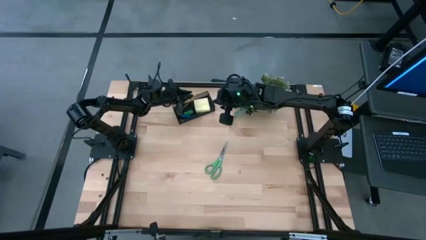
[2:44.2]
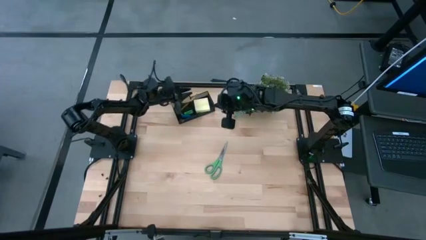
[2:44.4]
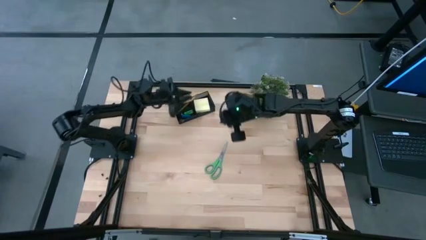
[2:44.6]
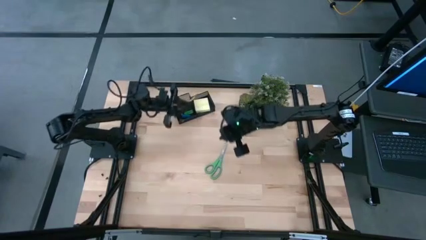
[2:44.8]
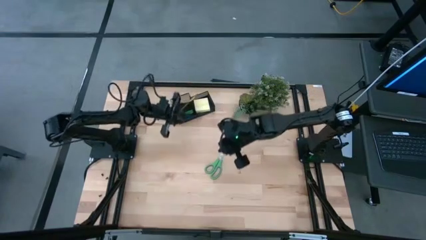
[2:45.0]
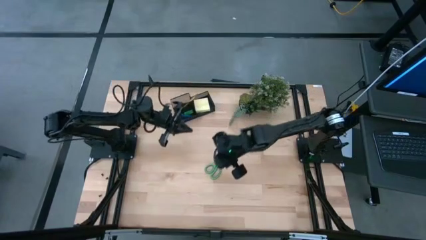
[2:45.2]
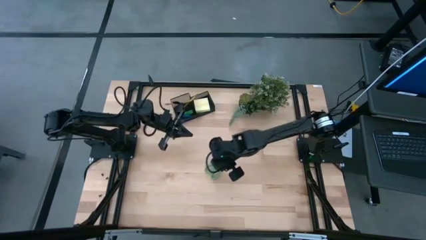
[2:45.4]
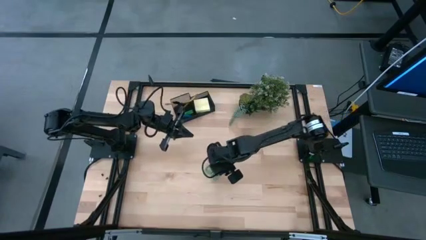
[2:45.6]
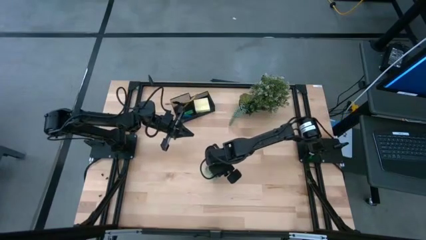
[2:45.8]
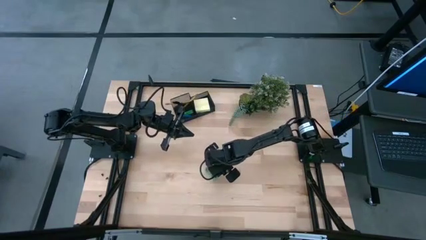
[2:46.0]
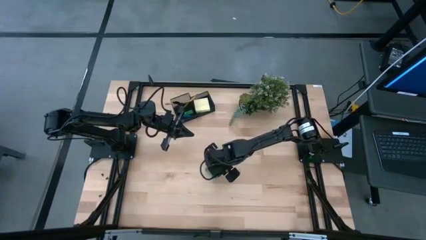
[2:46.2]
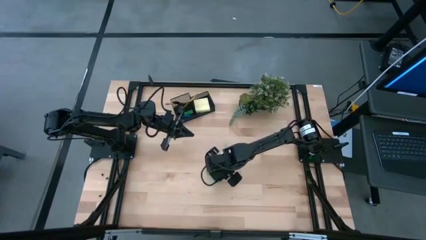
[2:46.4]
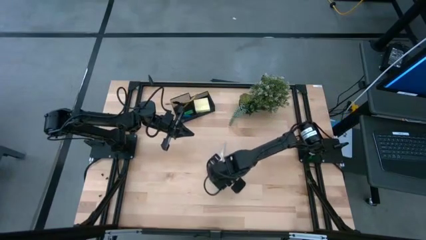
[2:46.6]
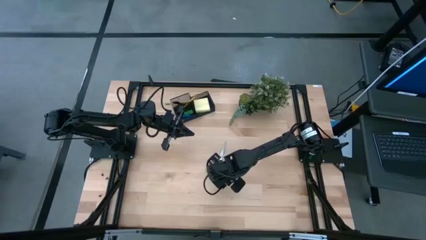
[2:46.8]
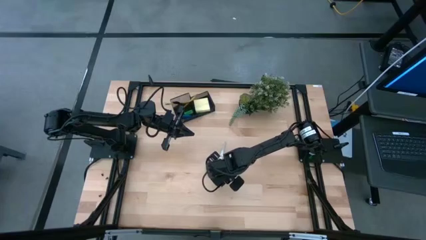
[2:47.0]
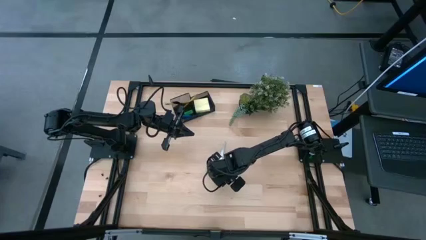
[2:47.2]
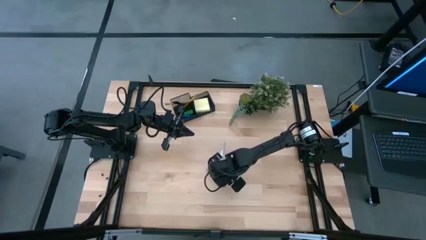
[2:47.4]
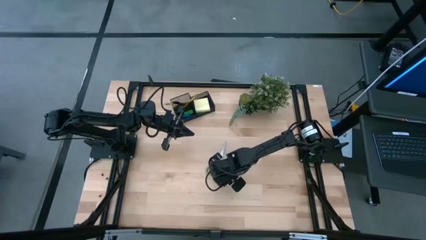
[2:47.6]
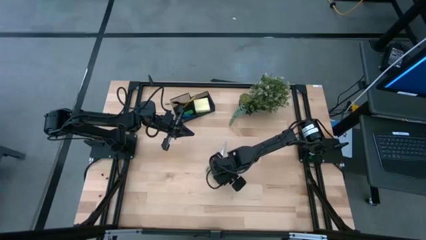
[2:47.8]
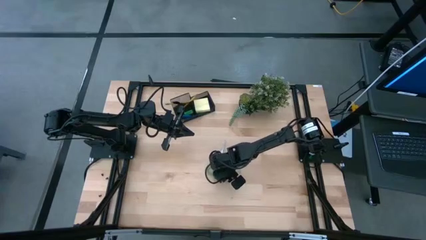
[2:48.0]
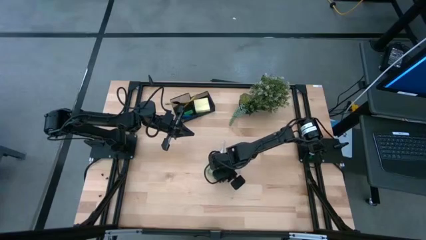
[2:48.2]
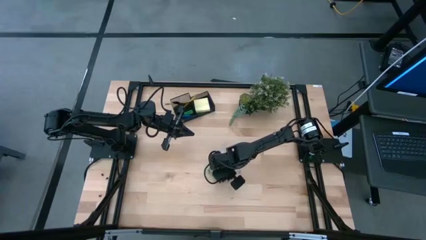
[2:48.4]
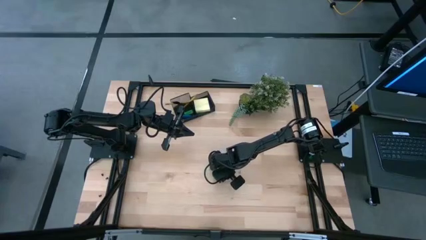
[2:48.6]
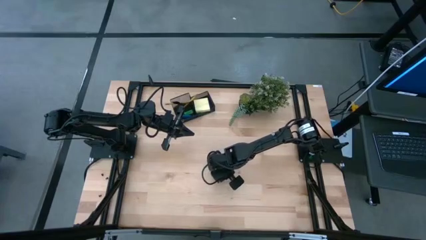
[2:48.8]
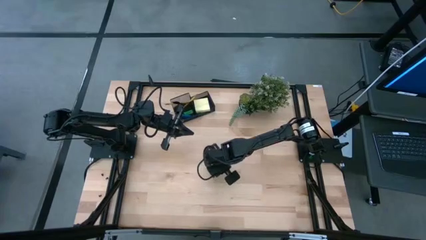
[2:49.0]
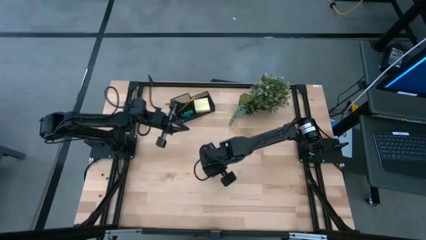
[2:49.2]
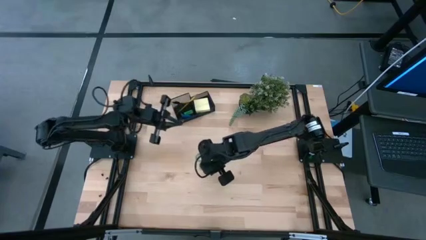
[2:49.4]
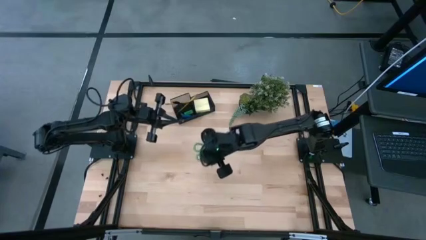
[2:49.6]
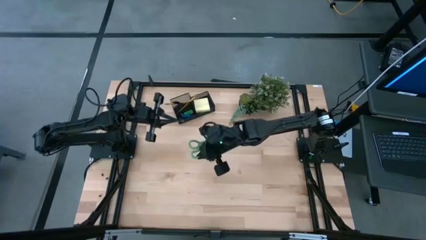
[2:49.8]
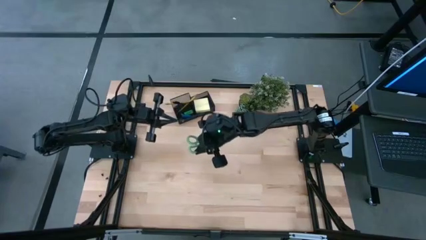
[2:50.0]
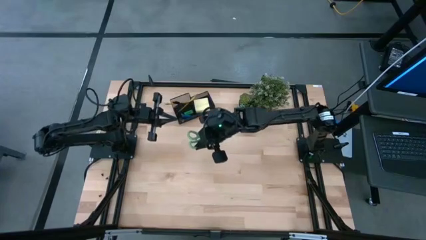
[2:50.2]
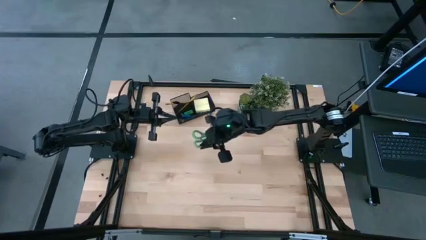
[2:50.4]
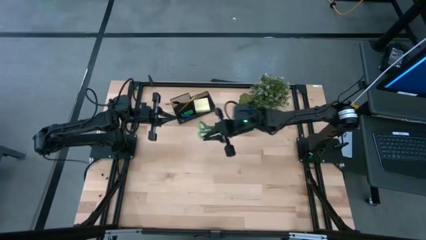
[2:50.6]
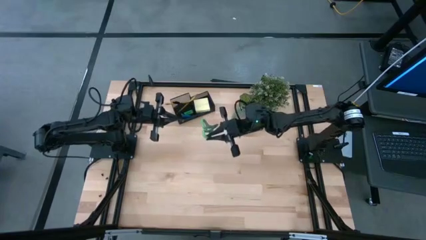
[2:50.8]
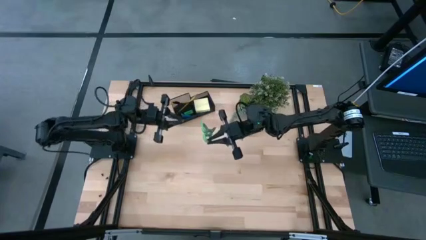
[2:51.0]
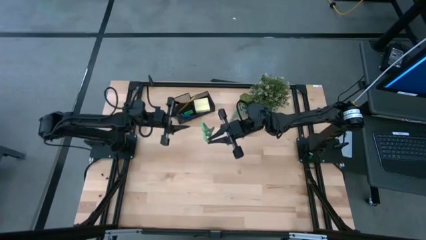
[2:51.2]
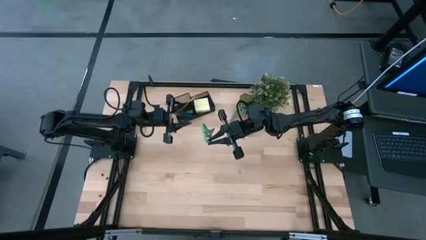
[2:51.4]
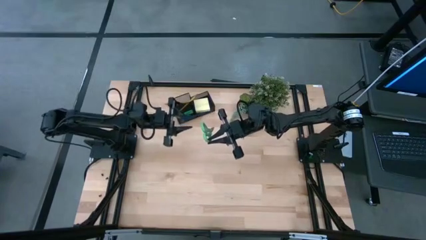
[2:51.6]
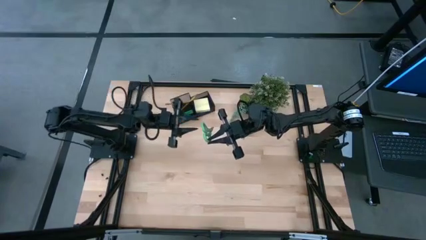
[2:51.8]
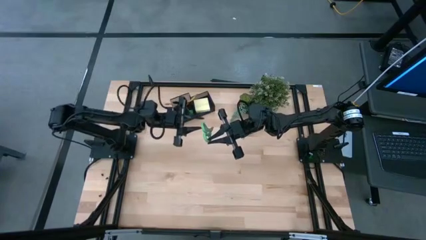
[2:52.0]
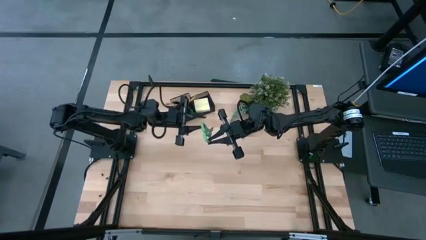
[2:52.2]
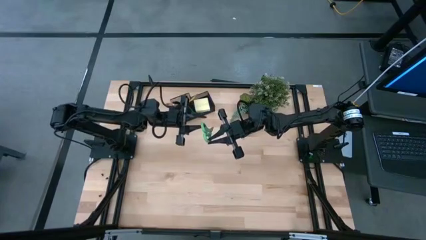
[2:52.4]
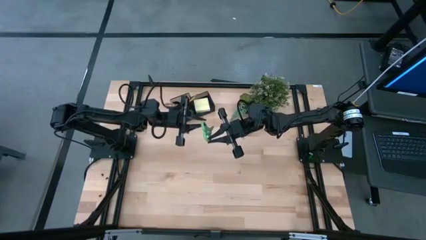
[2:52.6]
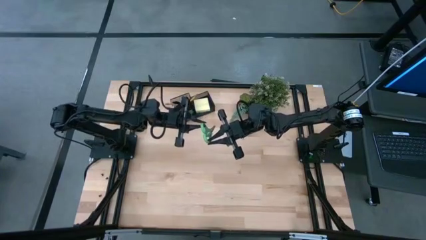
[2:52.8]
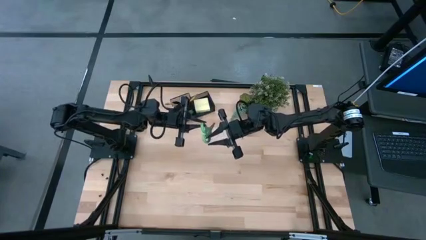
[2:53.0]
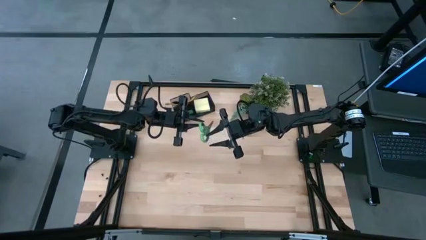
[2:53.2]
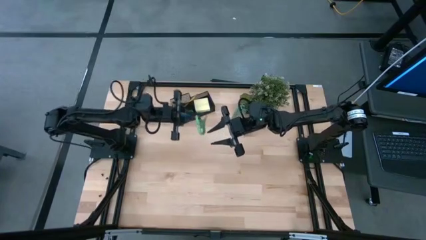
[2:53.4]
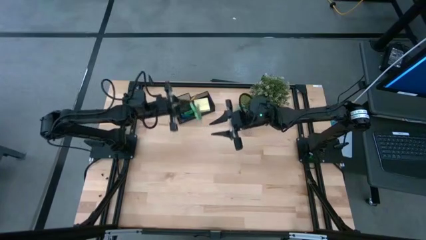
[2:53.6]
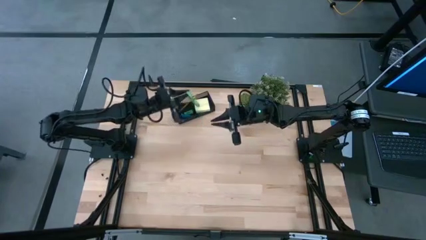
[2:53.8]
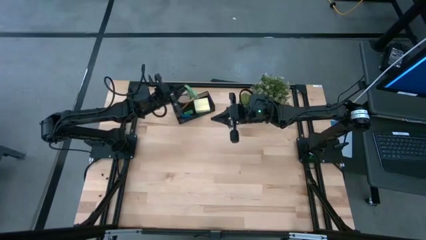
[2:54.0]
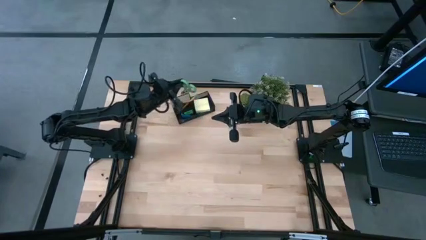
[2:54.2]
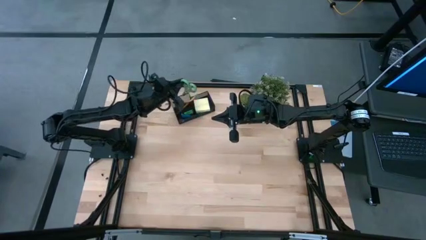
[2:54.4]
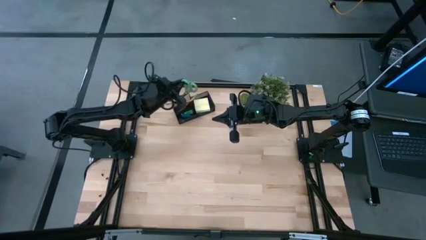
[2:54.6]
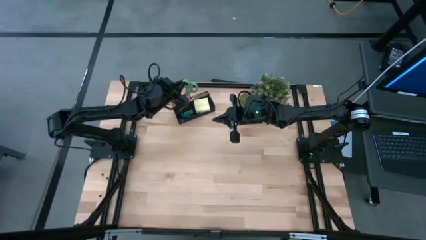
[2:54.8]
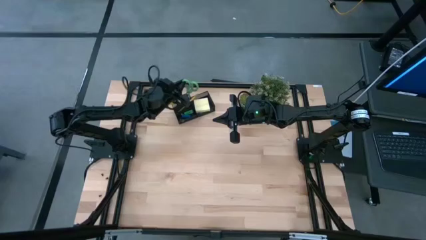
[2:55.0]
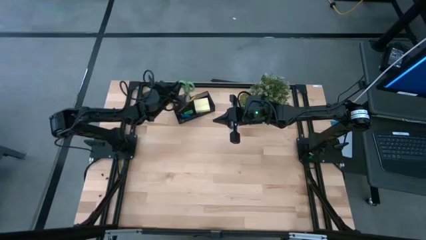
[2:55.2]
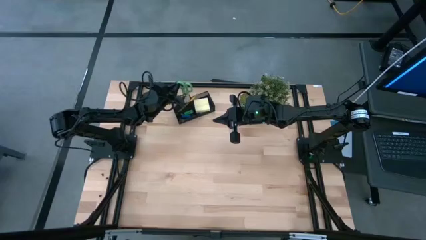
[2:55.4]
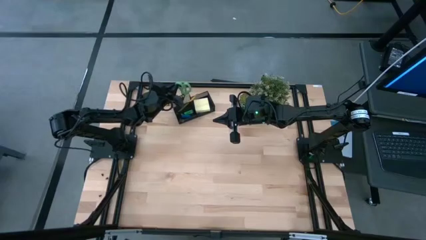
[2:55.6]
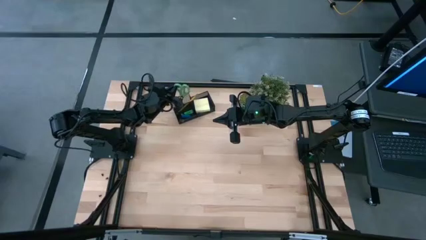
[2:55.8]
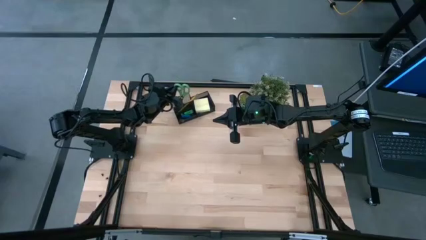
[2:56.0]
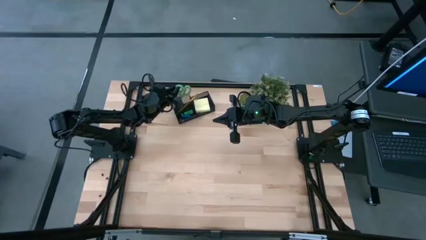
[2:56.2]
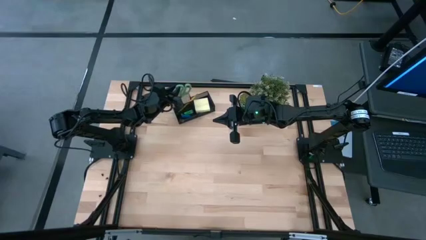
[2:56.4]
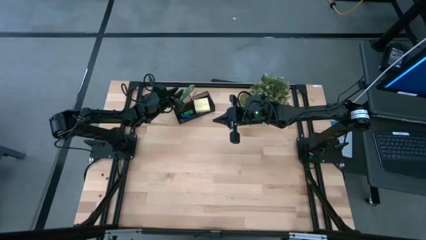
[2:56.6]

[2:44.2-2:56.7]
Task: Pick and place office supplies into organizer
Put the green scissors into the black desk organizer

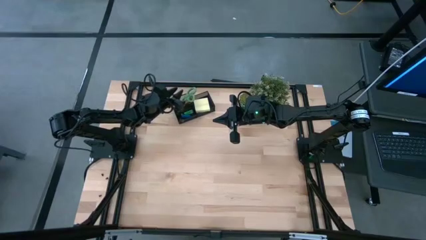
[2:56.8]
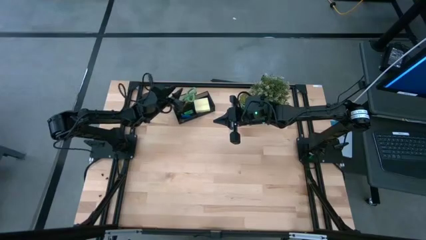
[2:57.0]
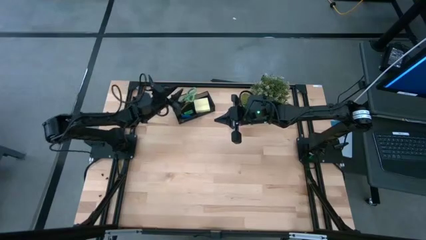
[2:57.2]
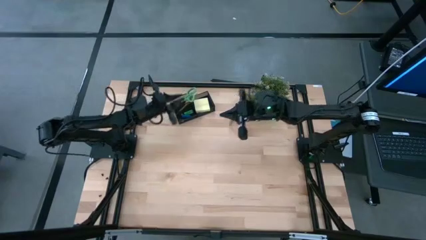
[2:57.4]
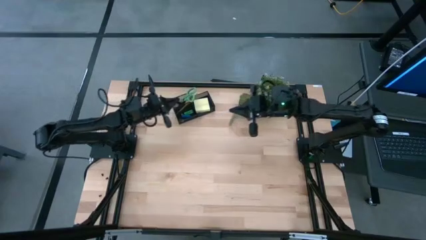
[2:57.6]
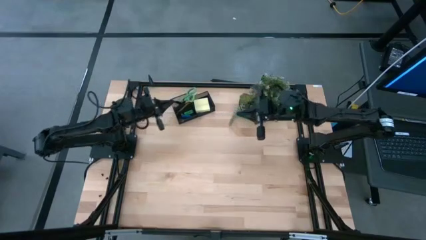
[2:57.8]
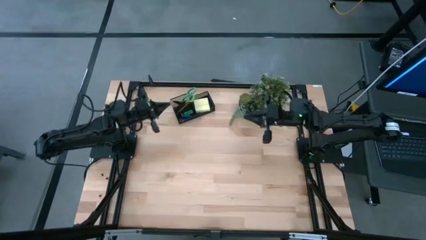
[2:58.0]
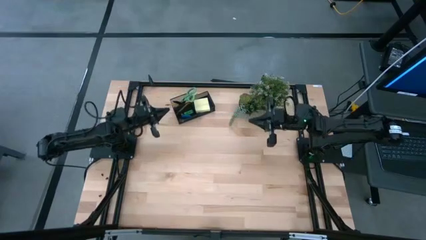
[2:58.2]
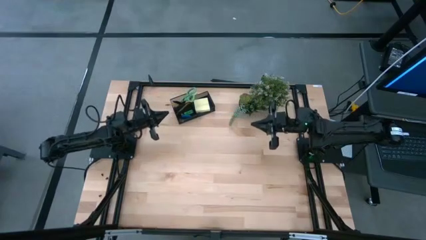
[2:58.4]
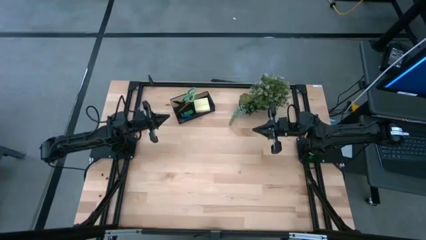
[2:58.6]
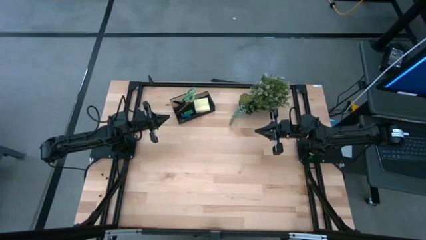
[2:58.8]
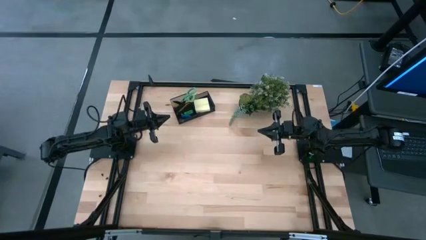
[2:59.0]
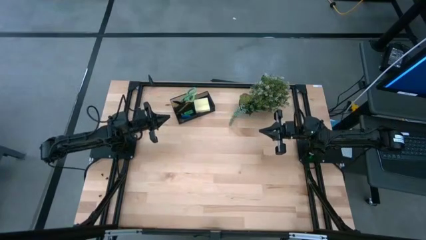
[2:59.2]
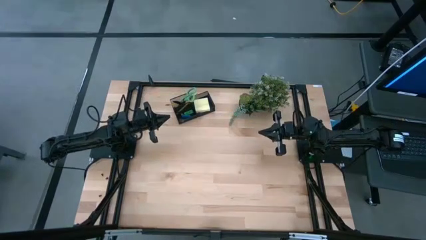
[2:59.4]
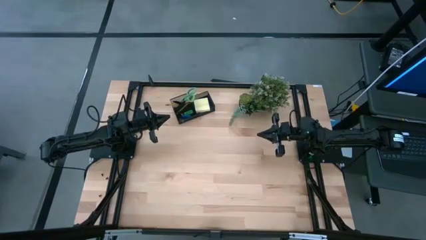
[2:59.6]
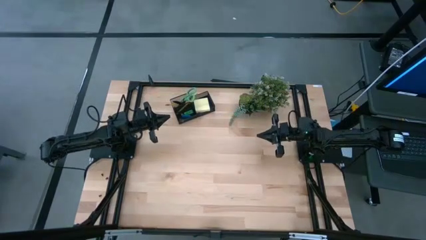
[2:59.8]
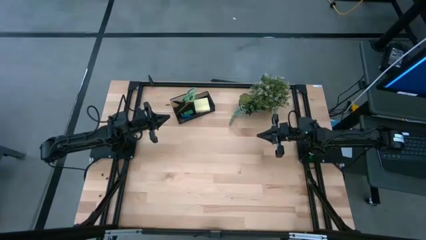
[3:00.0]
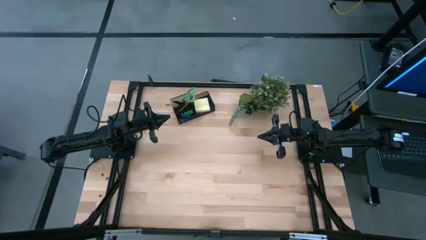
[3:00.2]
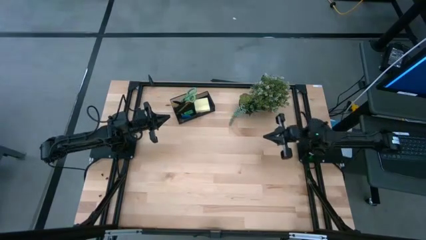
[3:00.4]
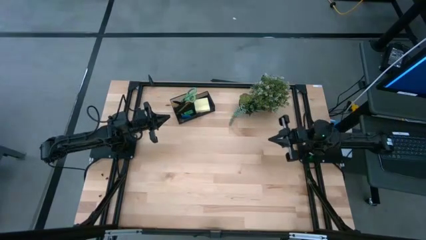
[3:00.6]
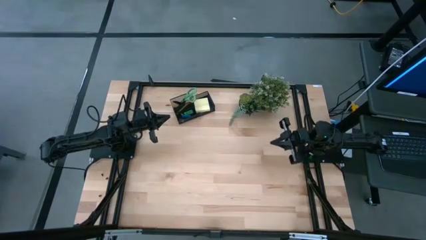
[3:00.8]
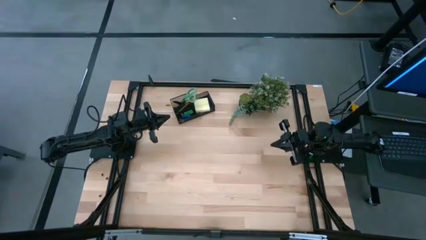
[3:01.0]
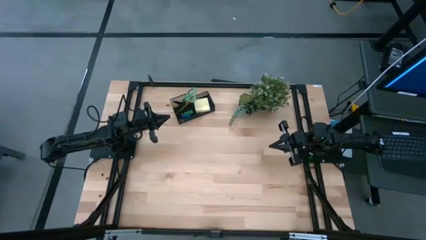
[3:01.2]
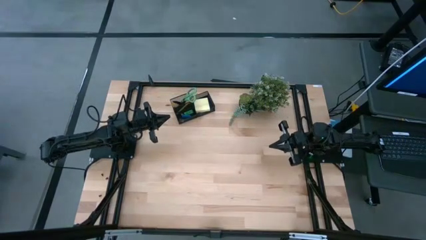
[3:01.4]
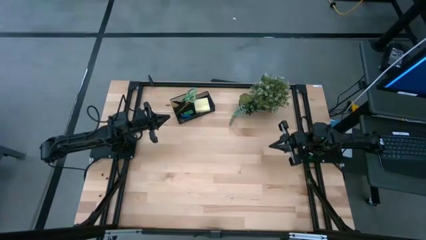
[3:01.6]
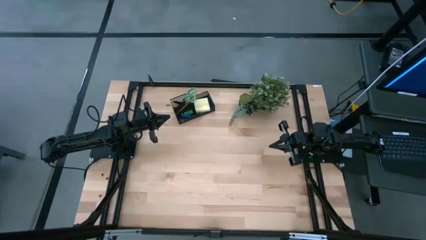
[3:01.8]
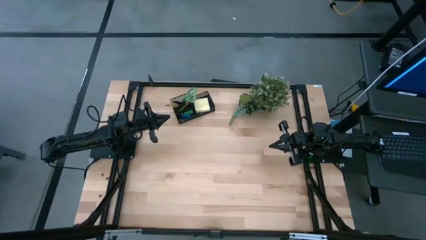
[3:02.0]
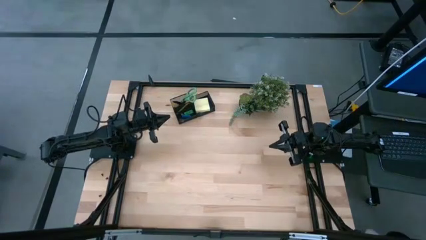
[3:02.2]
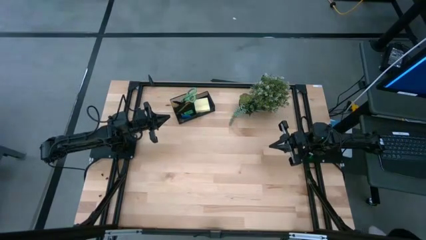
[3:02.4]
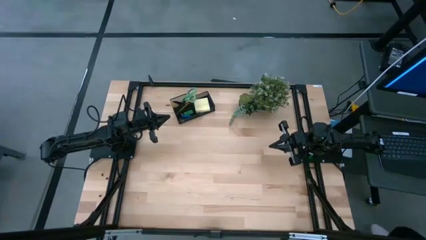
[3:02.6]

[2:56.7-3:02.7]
Return to Home Position
